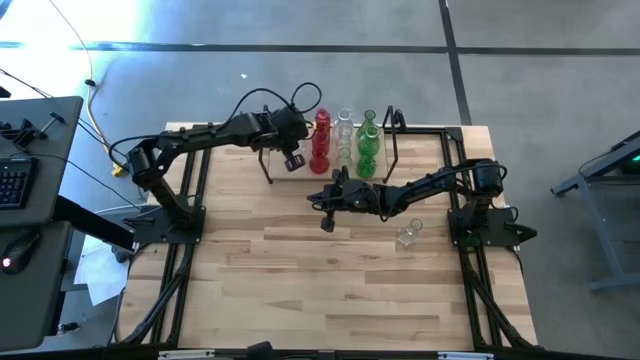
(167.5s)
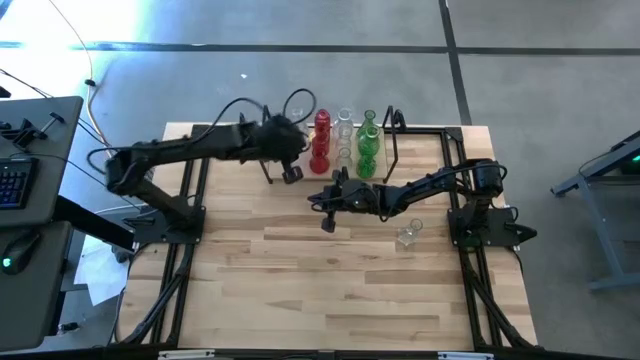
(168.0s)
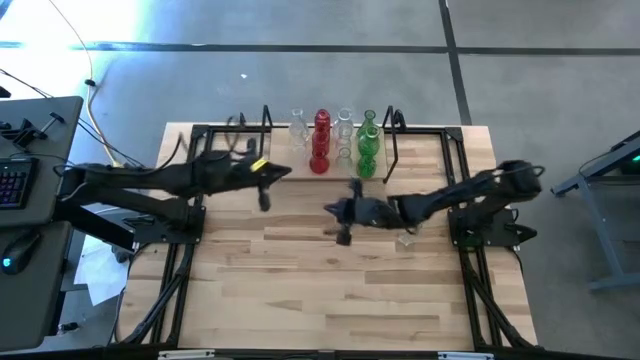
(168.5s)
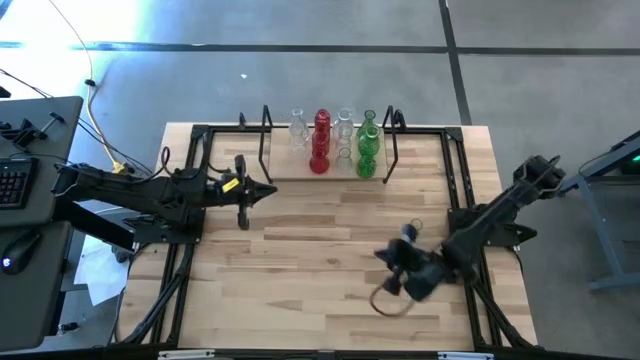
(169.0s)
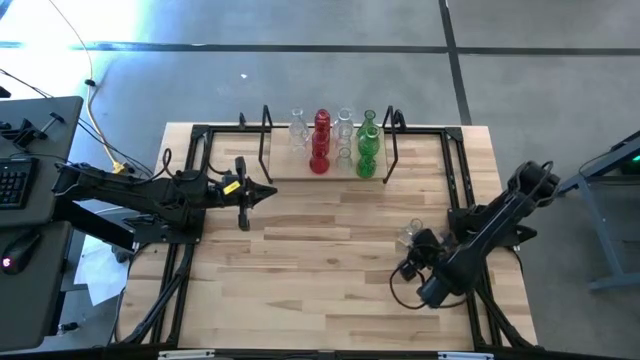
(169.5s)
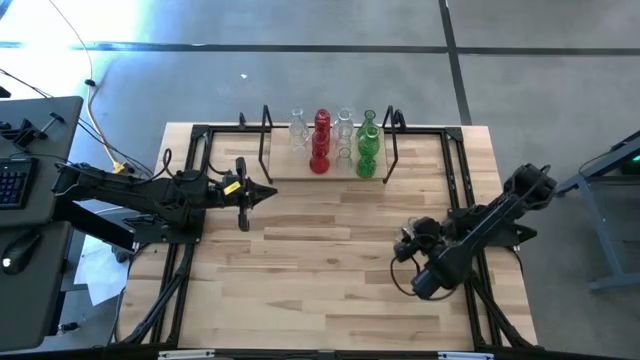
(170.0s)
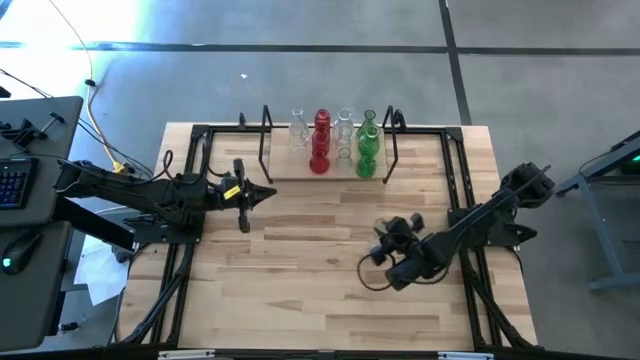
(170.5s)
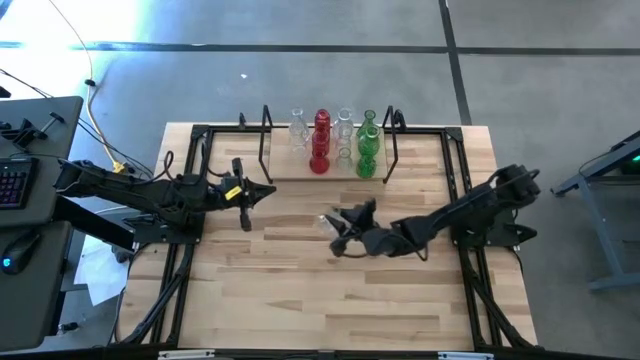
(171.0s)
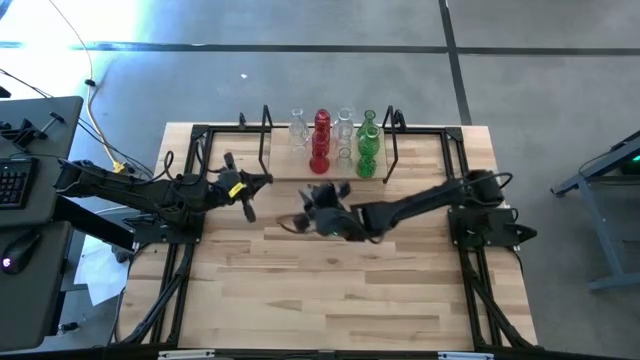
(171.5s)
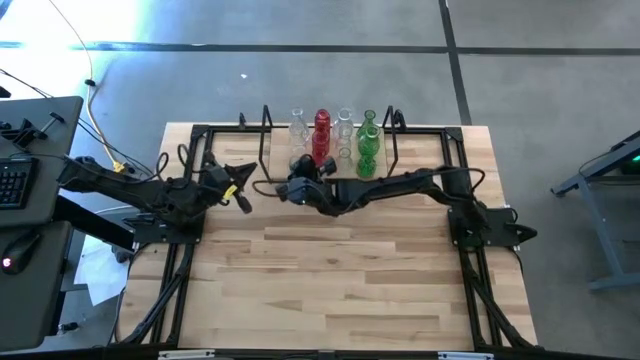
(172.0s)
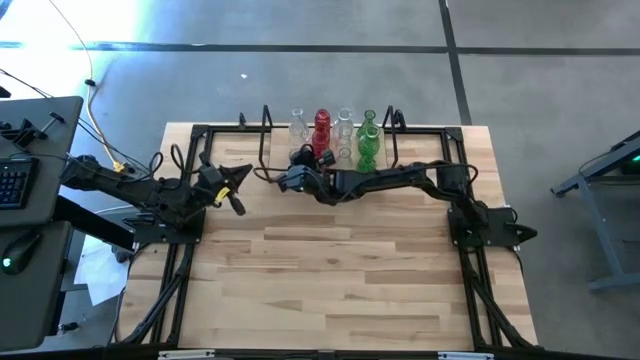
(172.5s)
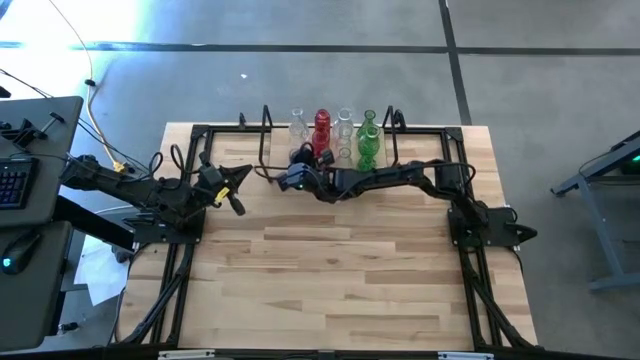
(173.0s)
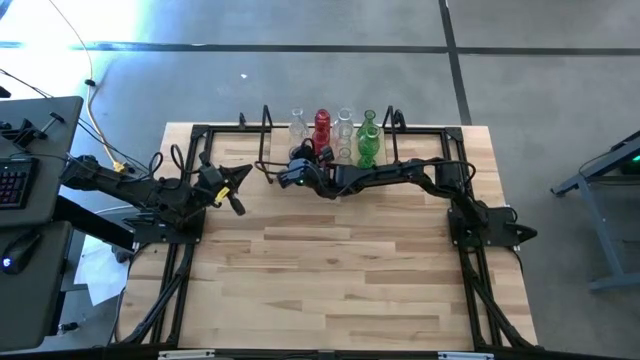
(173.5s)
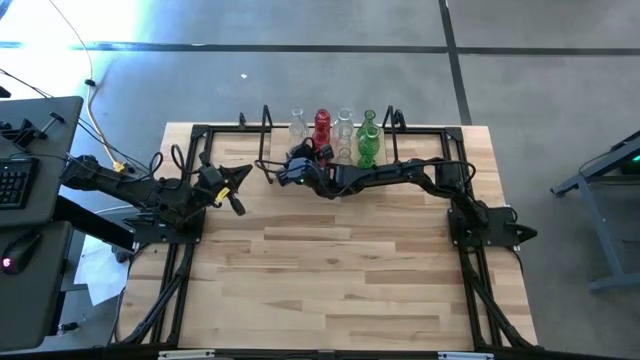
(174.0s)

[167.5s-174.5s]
Task: sort vases onto shelf
Put the transparent vase aligned with the other transparent vases on the shelf

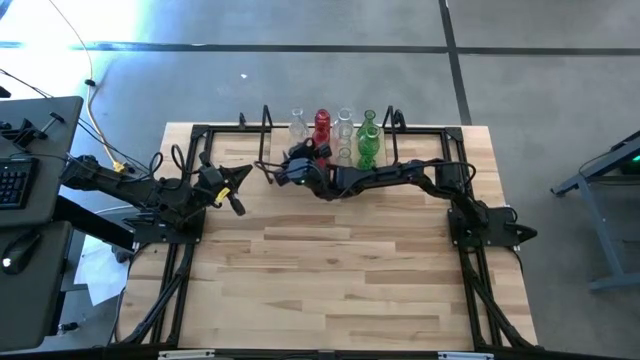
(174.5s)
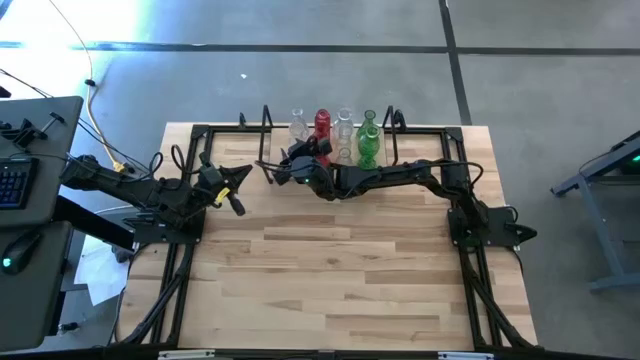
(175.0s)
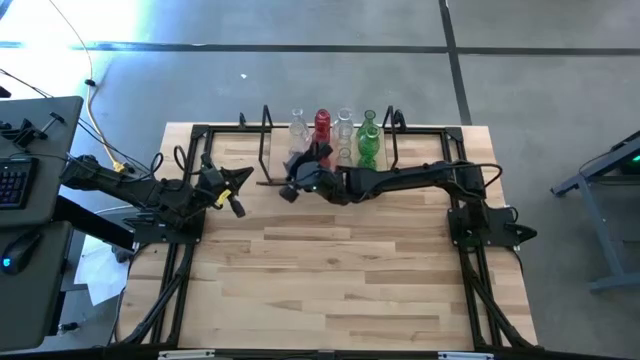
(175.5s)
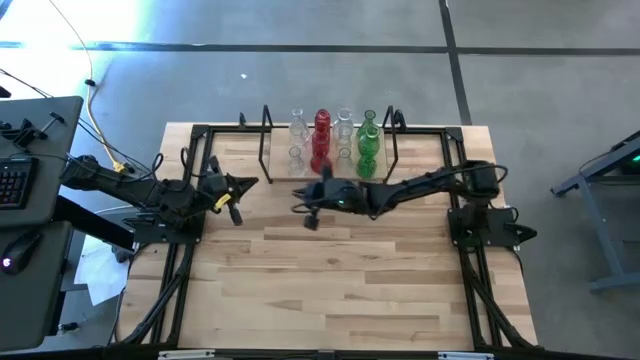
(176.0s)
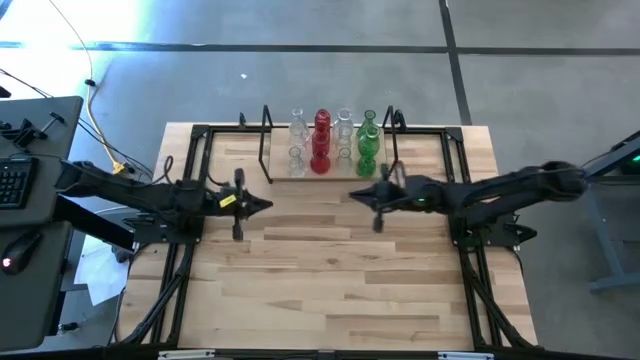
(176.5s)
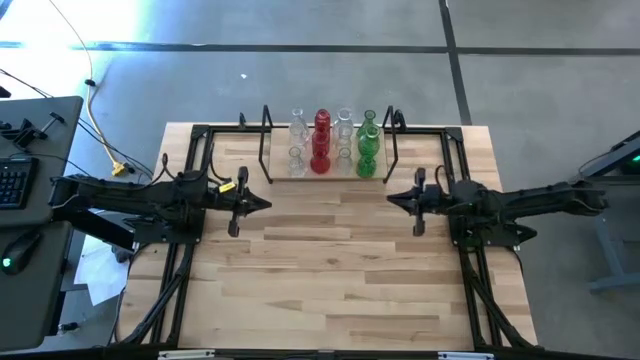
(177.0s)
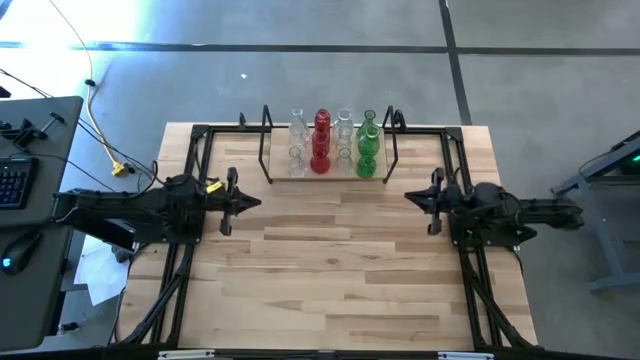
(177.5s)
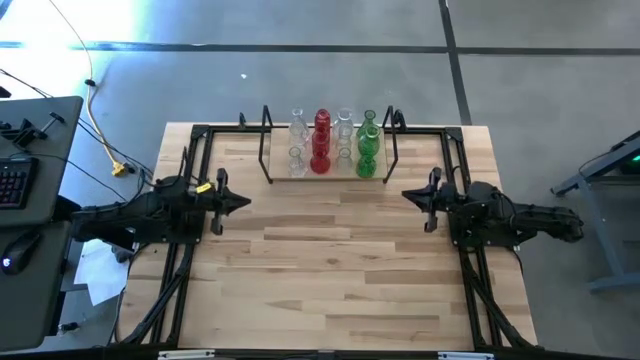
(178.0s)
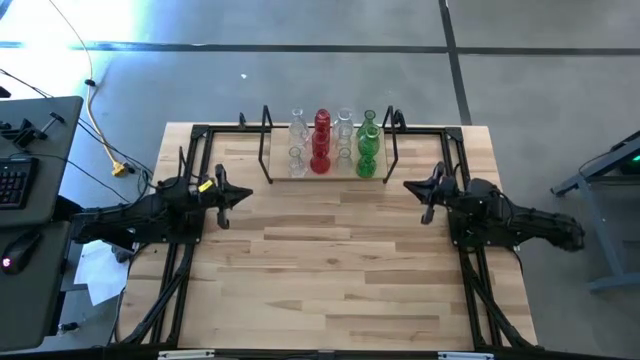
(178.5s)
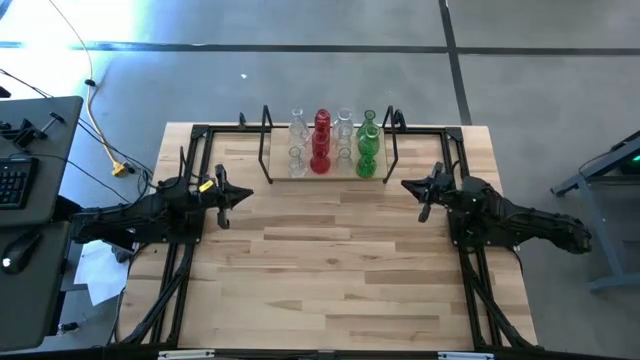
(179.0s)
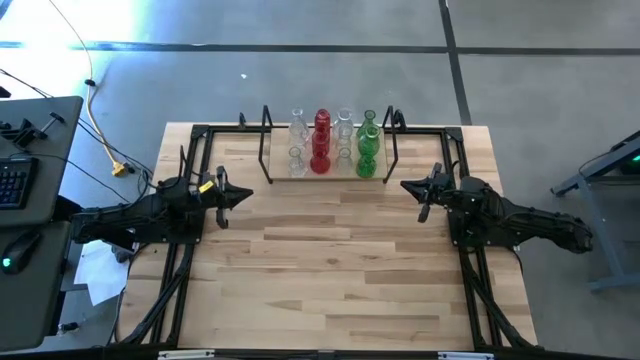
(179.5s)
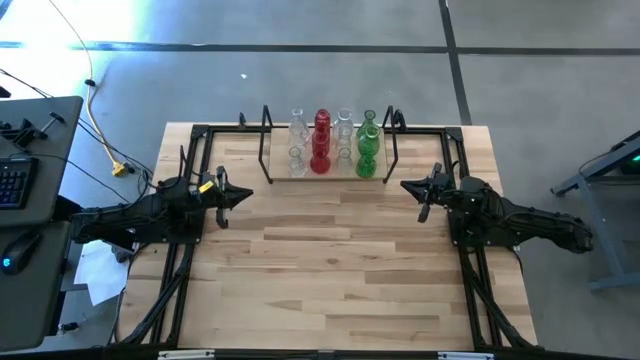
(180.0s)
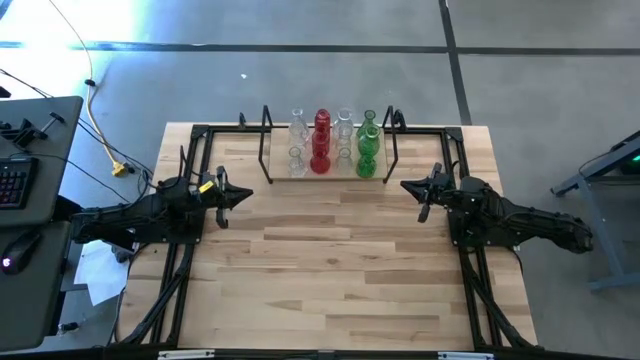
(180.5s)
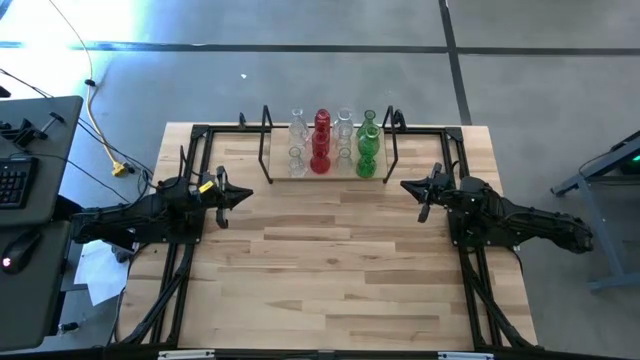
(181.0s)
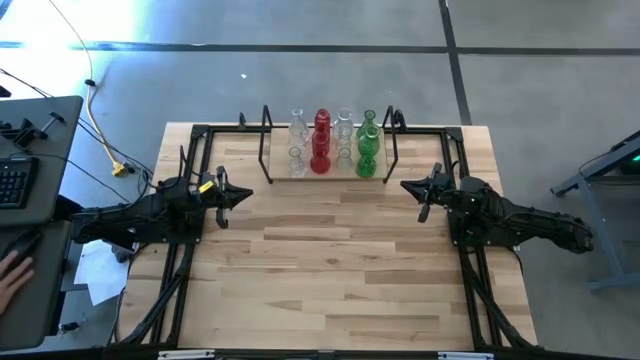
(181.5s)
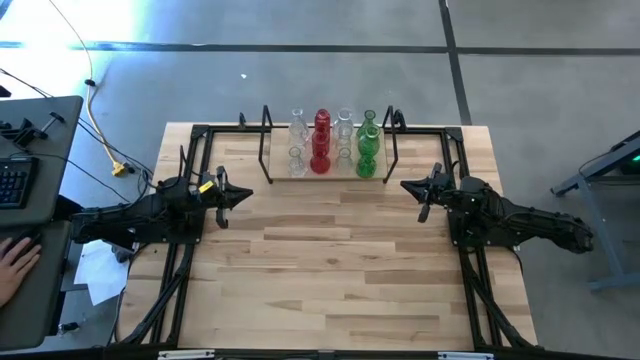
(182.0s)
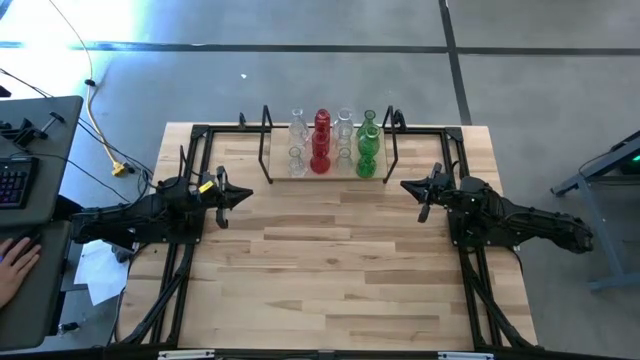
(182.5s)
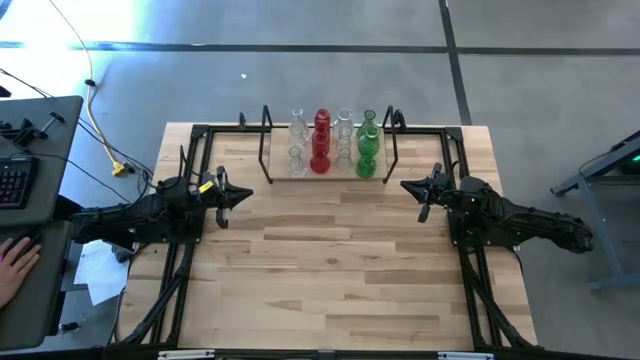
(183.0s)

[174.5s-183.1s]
Return to Home Position
